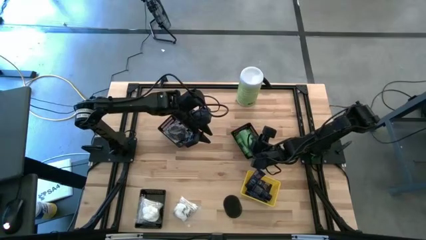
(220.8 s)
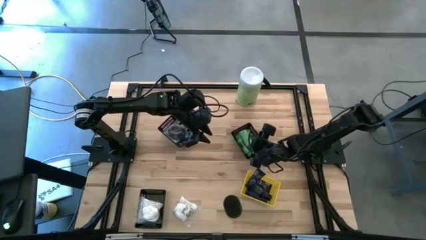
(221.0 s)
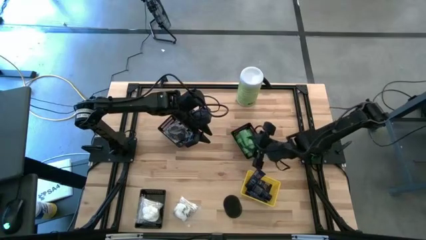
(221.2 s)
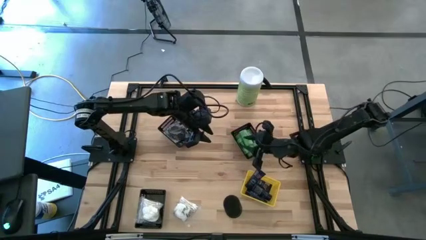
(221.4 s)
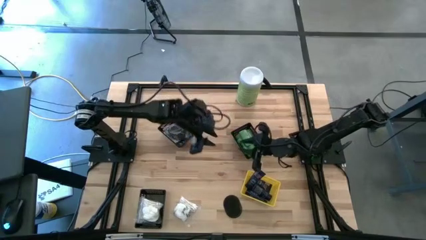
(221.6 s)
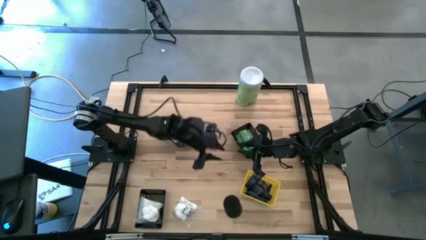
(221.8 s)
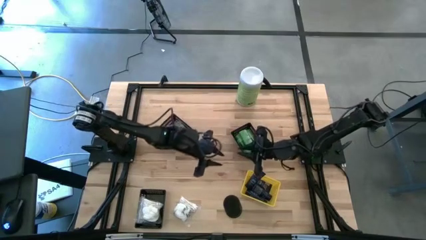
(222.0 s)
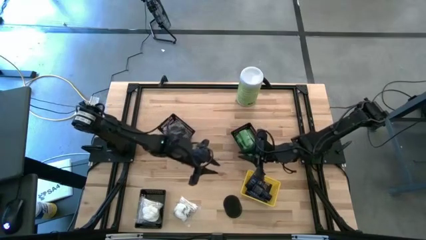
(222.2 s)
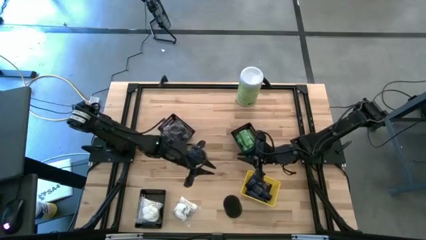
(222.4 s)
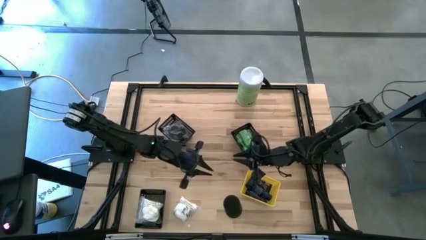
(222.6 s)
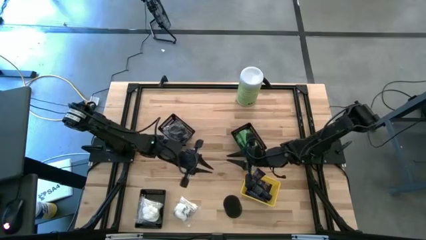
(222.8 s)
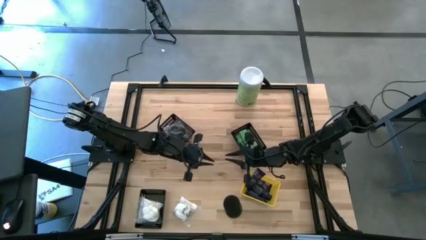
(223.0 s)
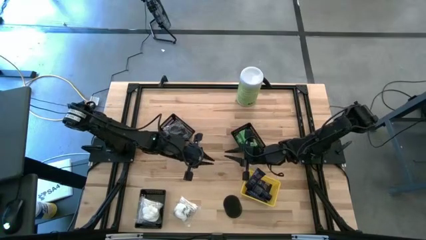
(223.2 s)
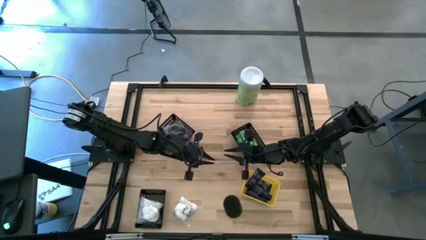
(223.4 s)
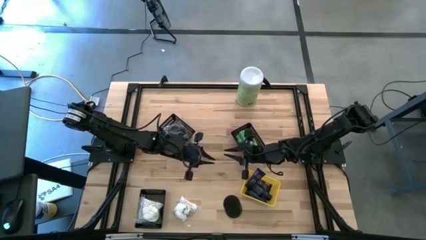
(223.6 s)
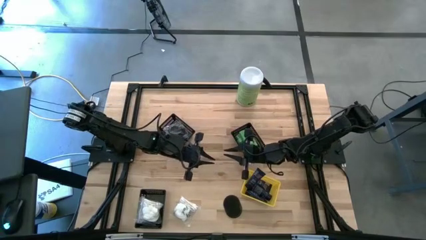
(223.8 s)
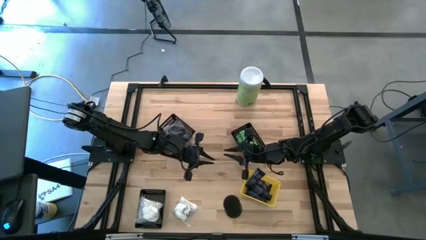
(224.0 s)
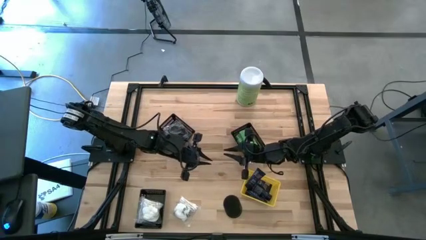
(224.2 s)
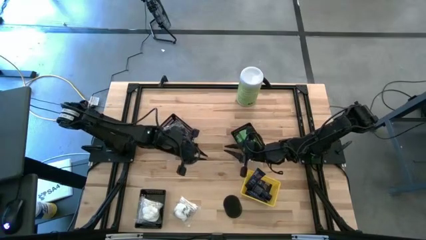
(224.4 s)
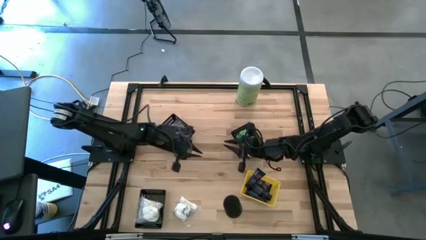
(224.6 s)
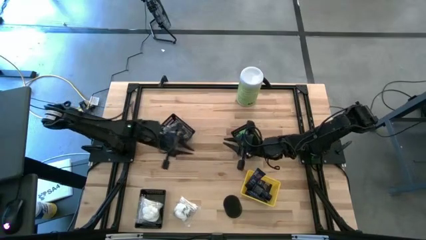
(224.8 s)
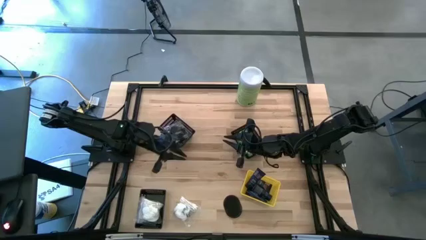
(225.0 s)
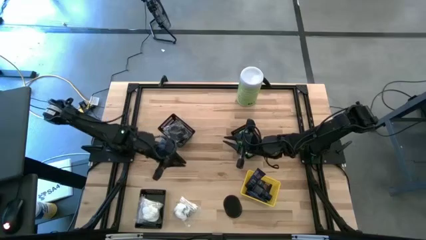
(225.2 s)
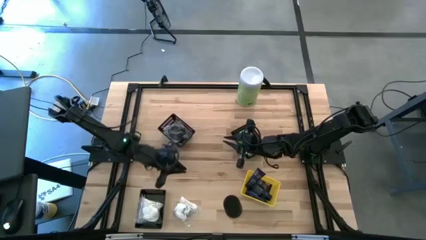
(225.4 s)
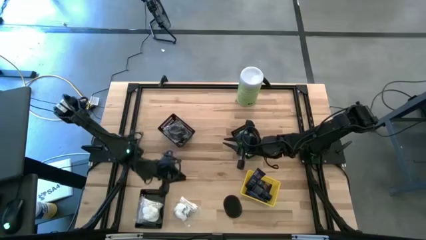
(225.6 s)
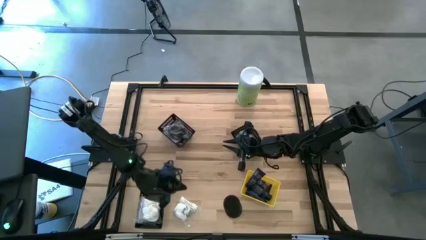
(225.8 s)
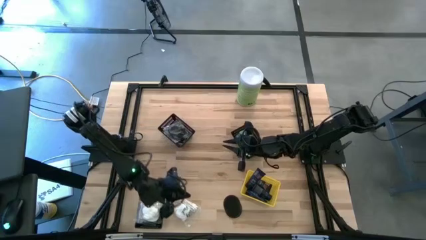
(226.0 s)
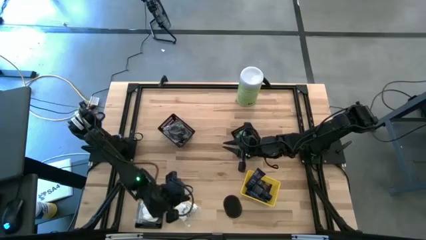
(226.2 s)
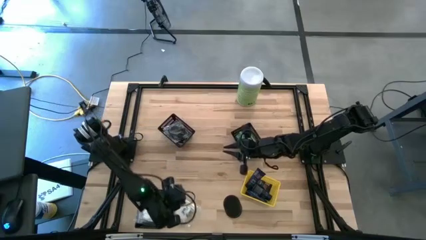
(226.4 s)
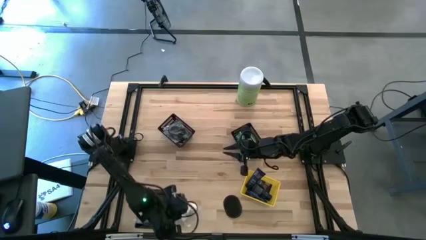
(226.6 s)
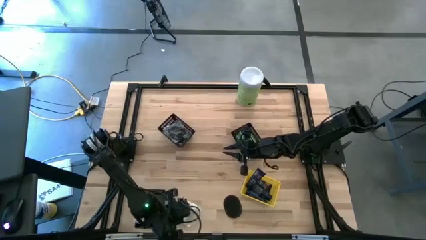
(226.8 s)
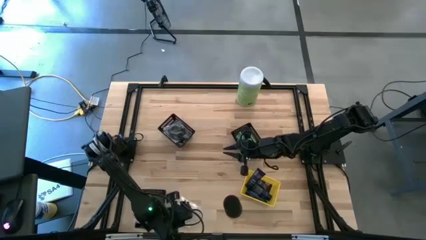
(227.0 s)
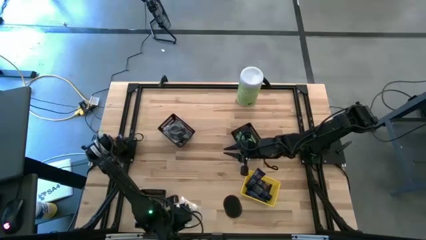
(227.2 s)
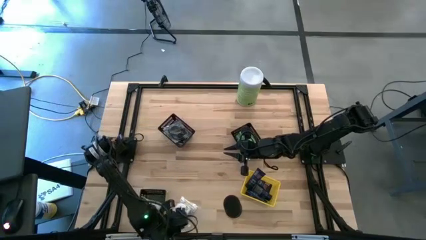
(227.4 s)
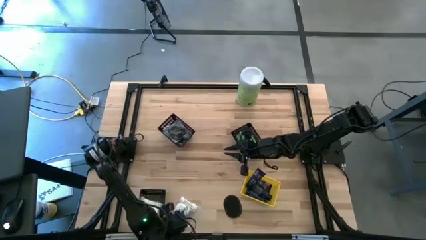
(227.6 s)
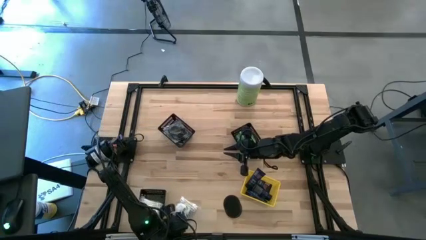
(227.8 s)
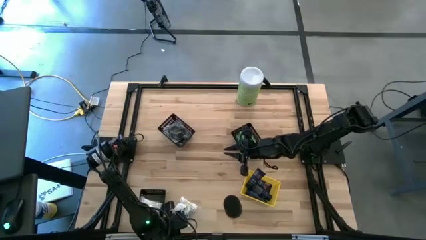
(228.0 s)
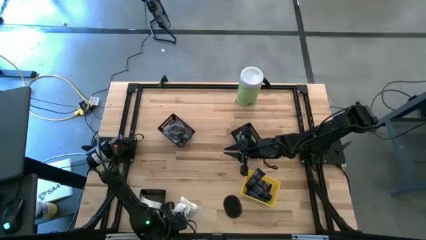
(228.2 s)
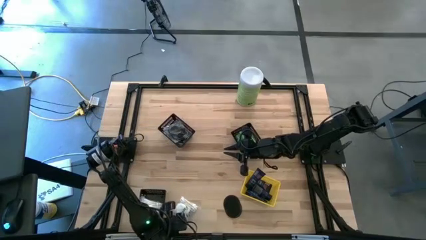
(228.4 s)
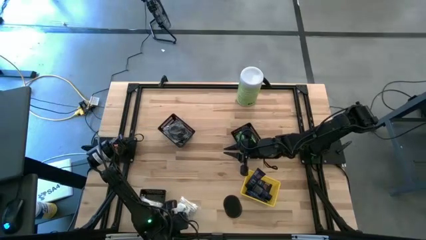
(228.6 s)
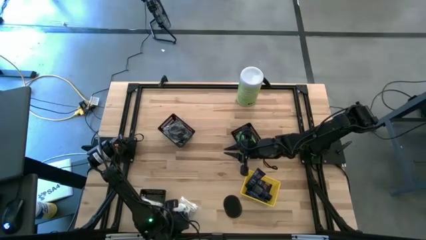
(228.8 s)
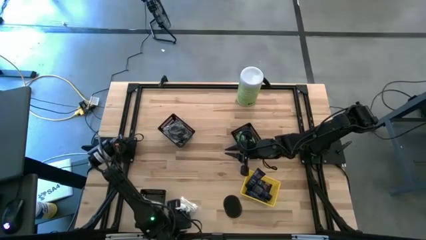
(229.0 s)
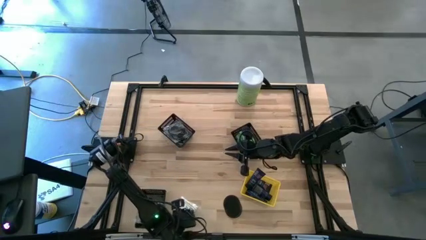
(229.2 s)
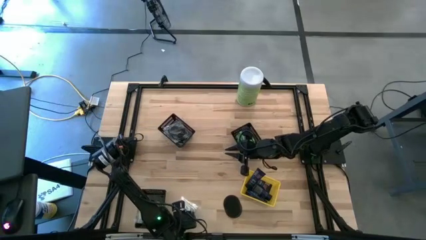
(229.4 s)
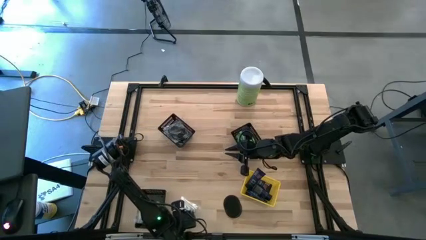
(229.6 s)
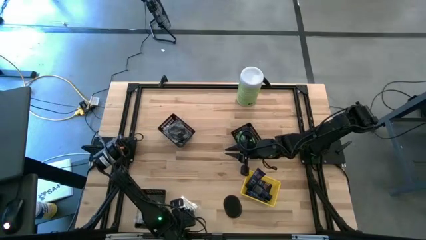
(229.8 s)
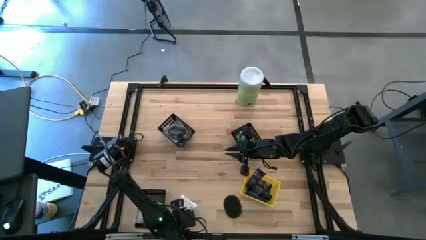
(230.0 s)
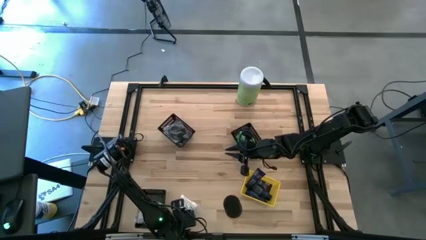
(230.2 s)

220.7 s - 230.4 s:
Task: Pick & Place Travel size toiletries
Put the cotton pack into the bottom left black bin

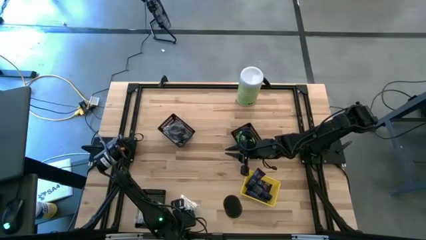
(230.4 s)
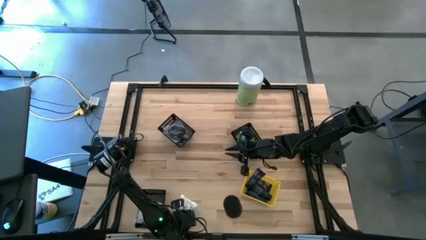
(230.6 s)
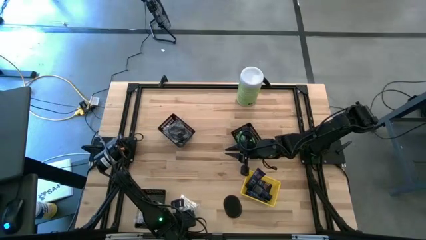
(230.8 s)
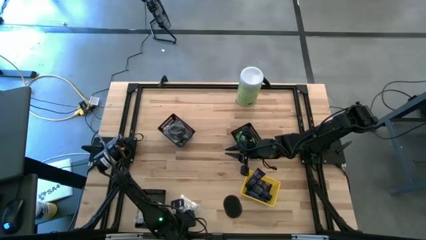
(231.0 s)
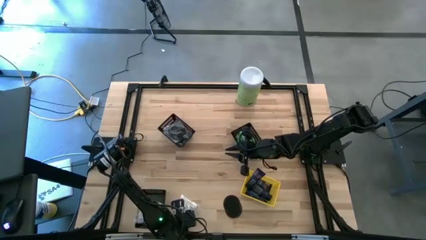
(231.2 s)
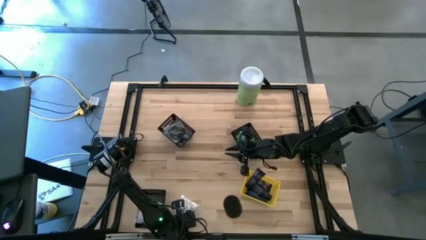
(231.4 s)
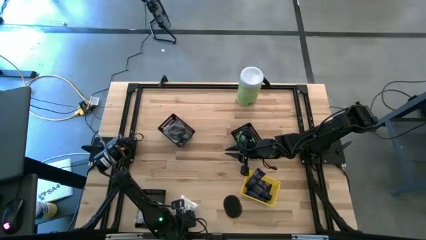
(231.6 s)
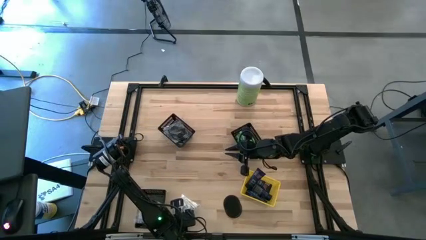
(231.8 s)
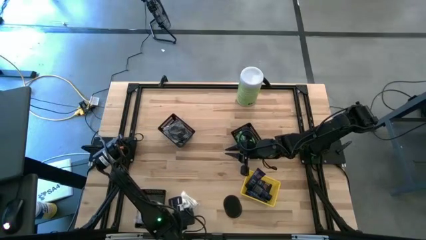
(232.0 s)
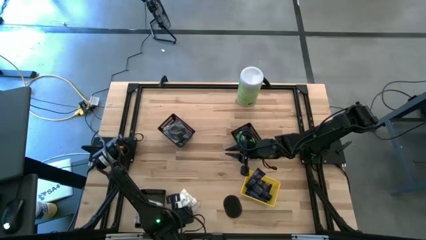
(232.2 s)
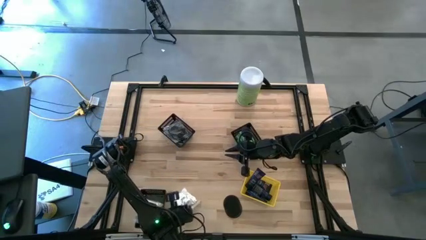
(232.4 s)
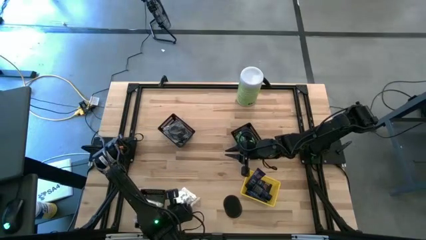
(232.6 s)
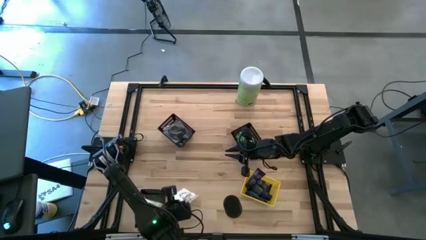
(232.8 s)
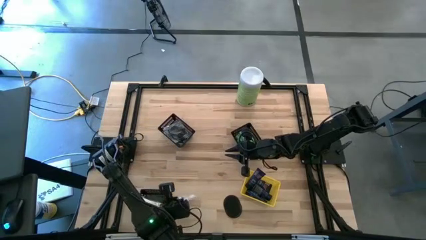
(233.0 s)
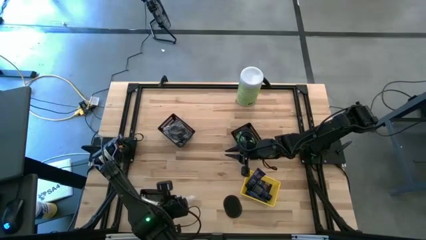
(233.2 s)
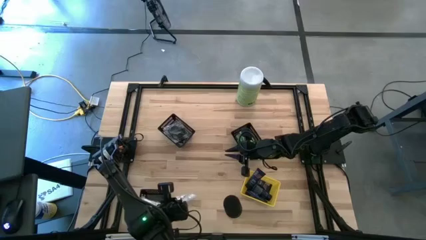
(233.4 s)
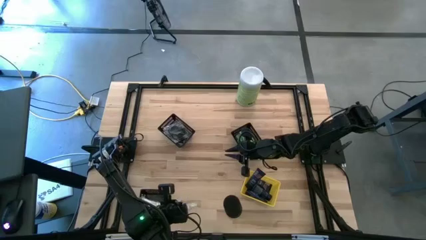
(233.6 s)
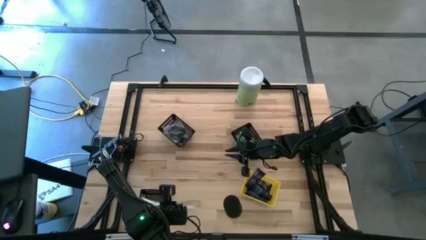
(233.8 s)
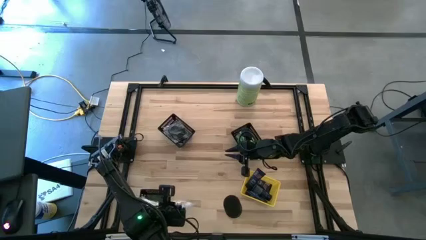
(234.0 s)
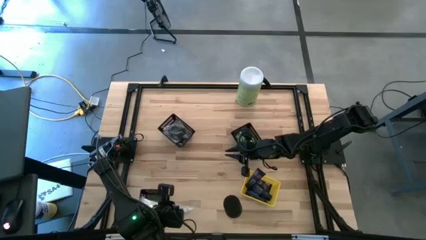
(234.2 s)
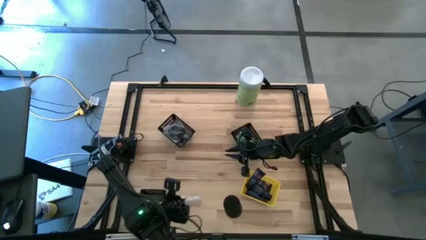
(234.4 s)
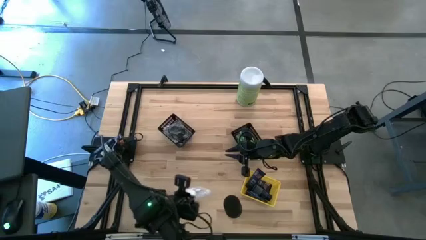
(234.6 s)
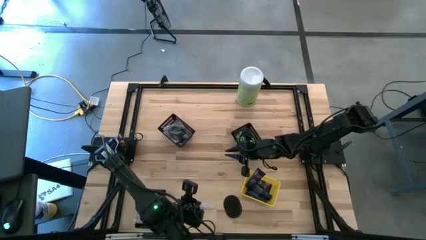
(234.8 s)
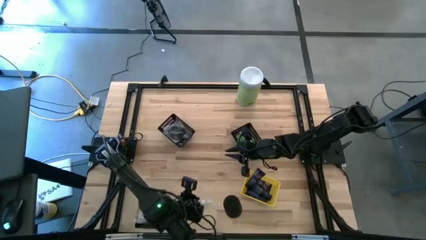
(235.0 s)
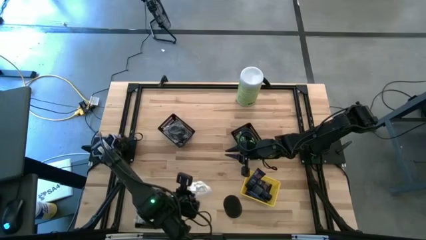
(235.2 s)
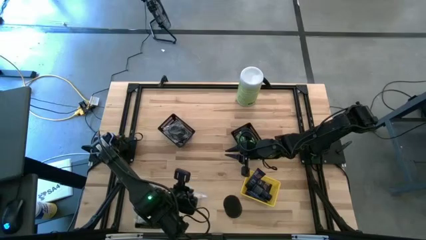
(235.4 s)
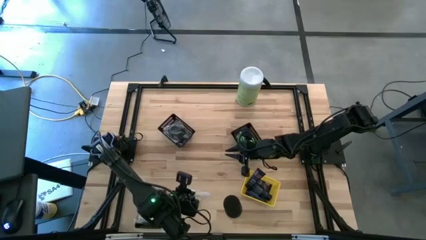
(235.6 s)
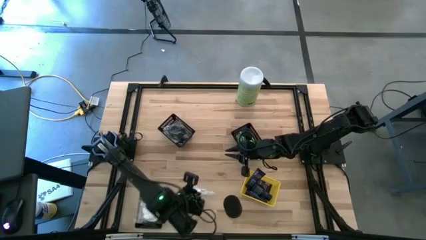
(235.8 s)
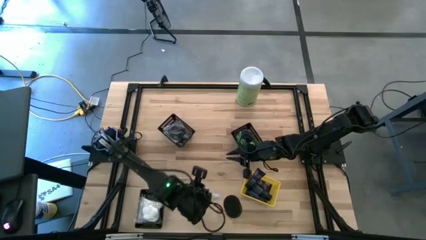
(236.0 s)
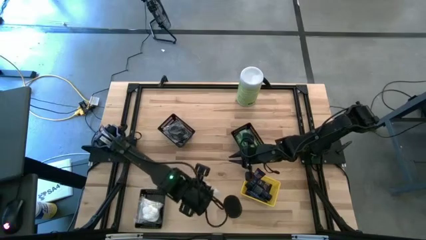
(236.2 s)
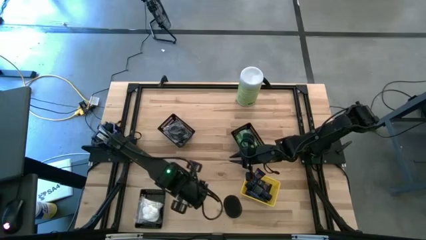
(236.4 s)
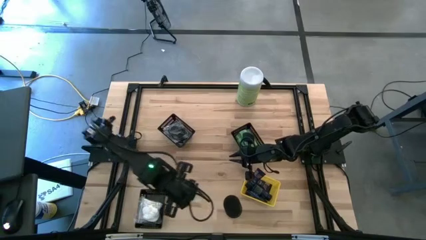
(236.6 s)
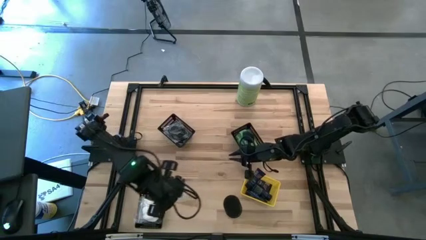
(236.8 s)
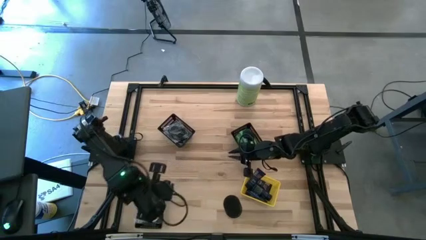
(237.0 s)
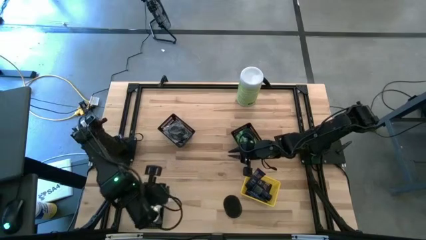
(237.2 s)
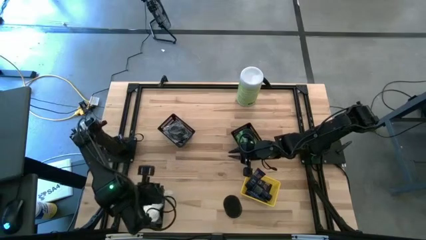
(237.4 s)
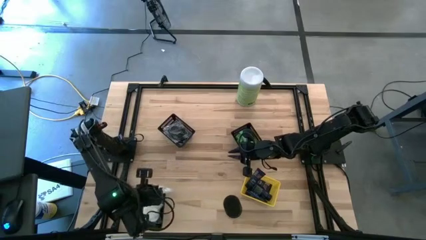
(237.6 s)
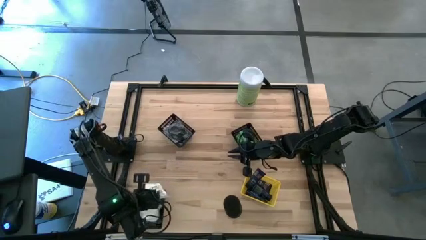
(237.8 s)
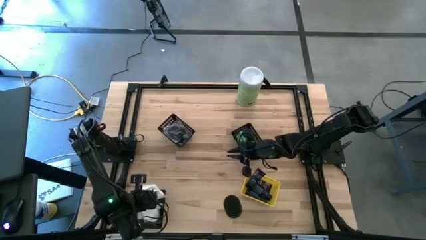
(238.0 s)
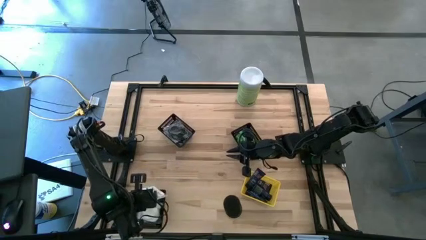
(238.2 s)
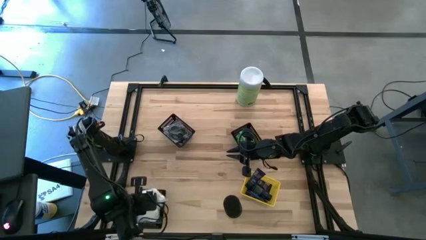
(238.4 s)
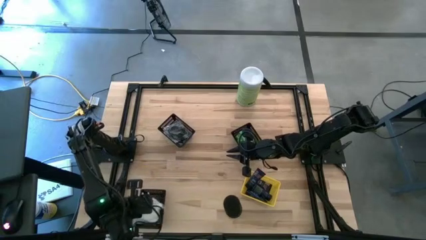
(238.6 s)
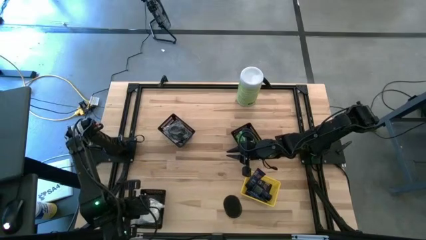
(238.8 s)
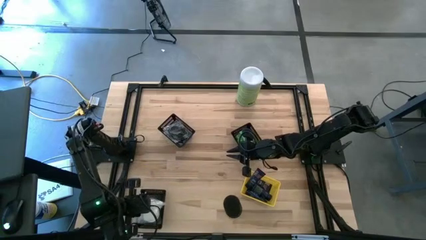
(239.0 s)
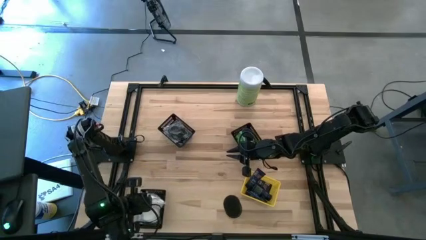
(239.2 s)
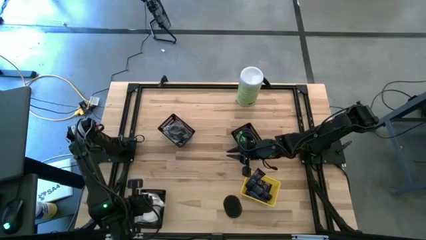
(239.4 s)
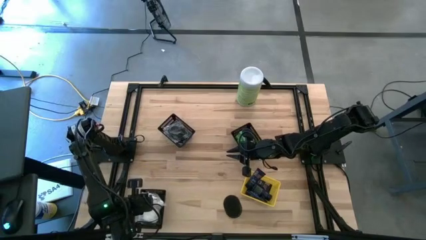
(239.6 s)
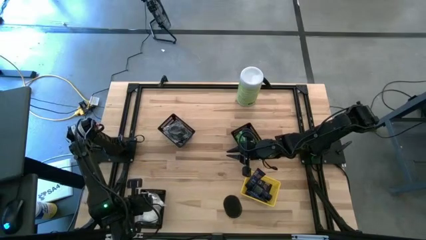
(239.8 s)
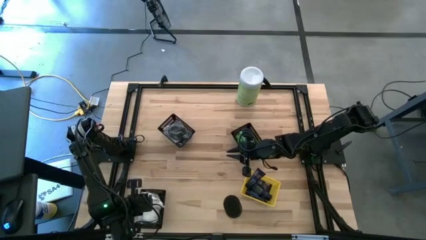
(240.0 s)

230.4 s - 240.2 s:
Put the cotton pack into the bottom left black bin
